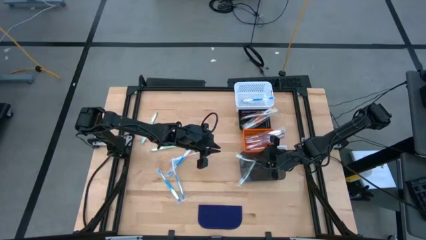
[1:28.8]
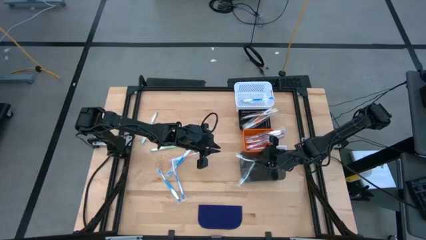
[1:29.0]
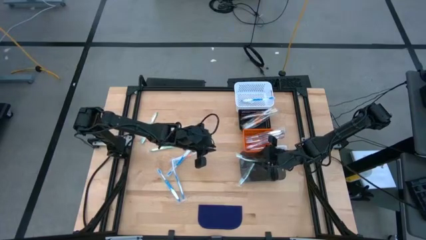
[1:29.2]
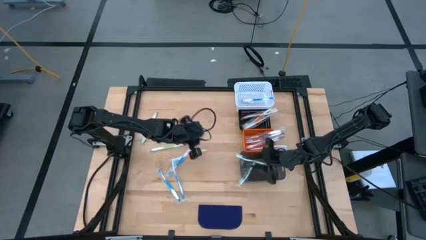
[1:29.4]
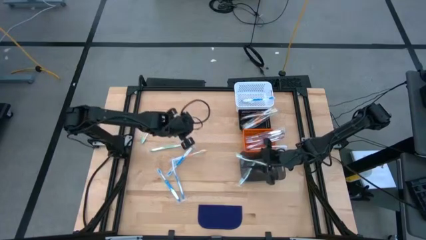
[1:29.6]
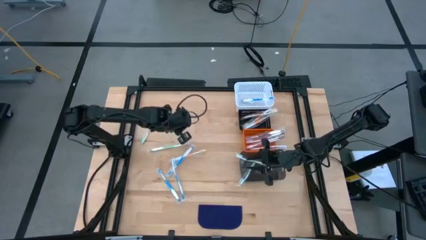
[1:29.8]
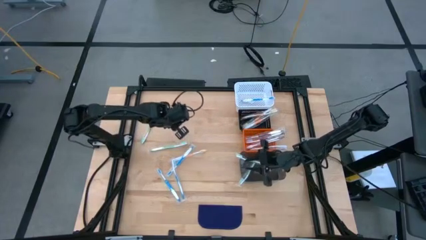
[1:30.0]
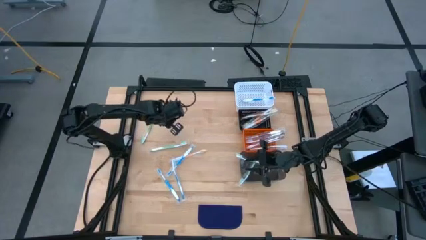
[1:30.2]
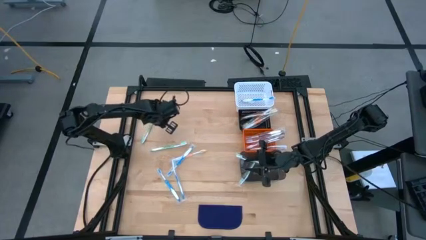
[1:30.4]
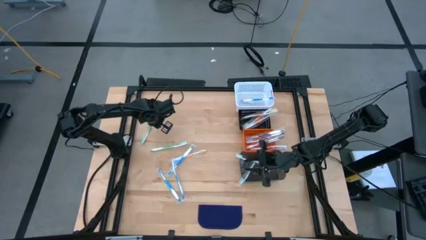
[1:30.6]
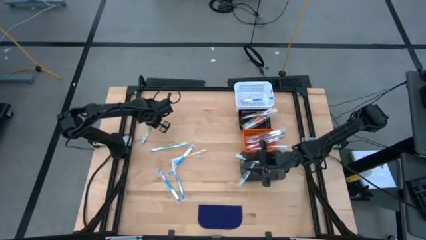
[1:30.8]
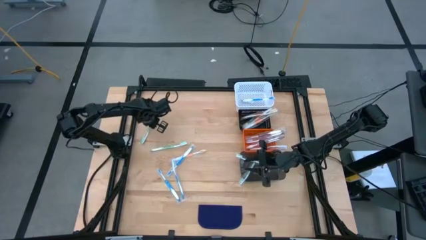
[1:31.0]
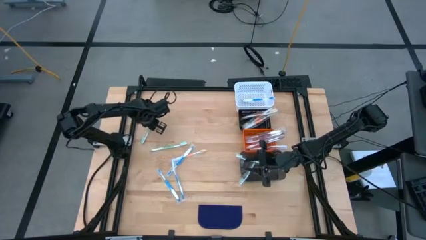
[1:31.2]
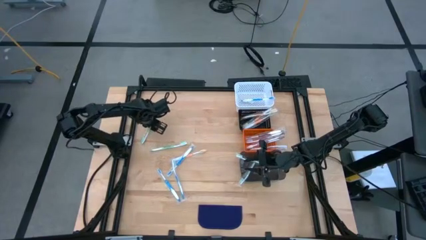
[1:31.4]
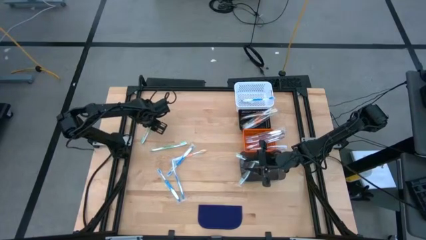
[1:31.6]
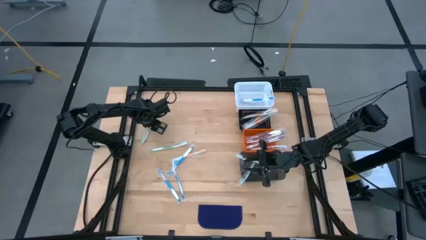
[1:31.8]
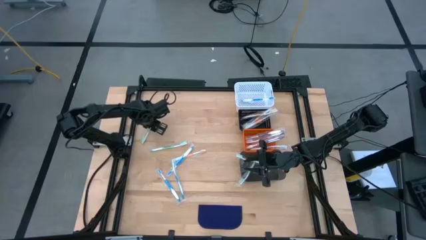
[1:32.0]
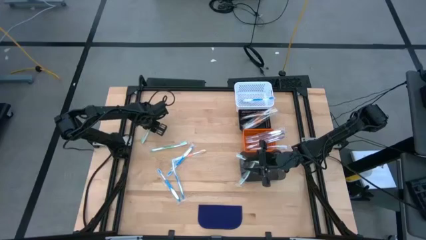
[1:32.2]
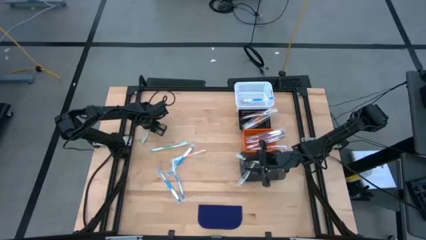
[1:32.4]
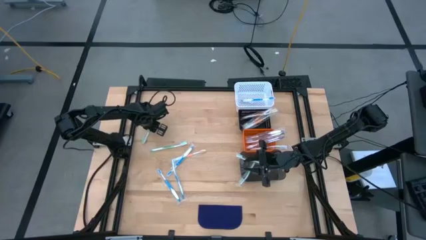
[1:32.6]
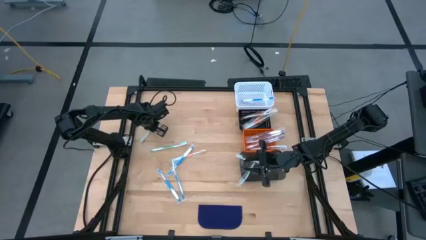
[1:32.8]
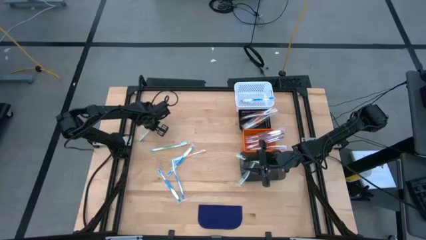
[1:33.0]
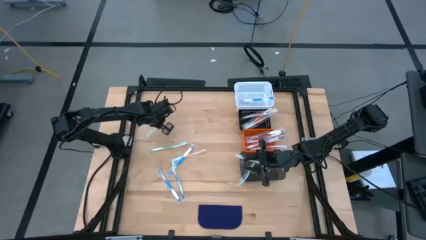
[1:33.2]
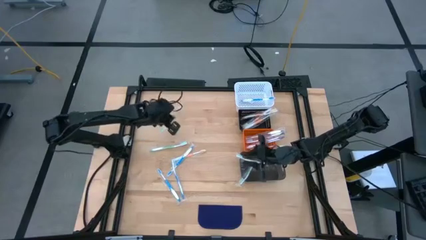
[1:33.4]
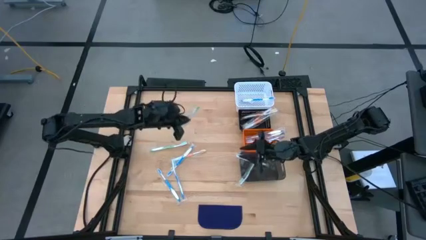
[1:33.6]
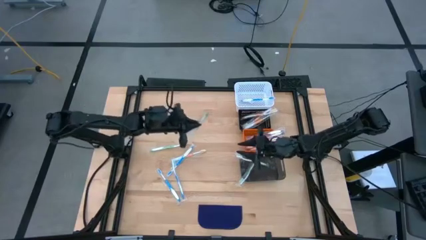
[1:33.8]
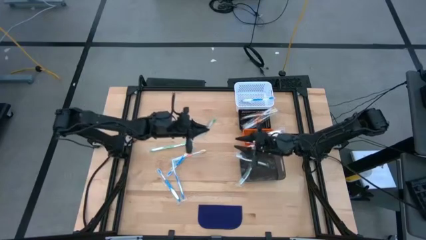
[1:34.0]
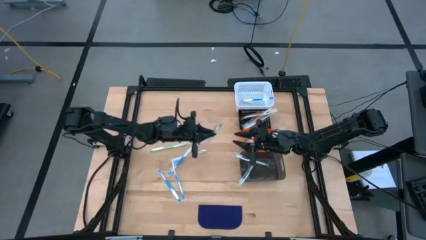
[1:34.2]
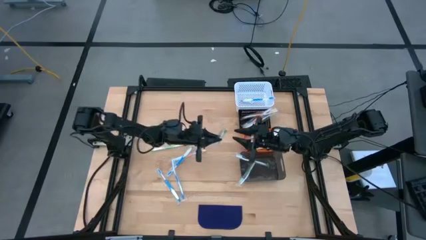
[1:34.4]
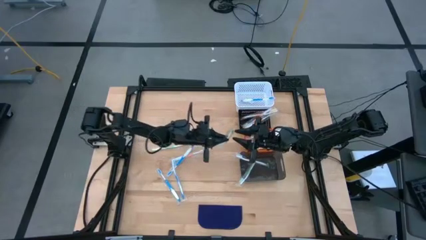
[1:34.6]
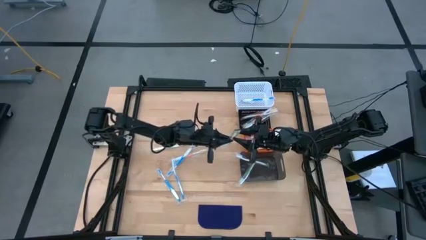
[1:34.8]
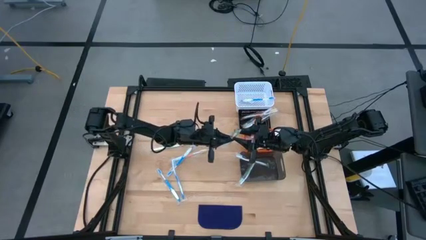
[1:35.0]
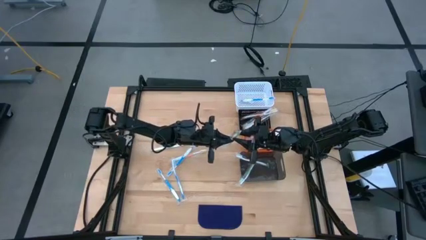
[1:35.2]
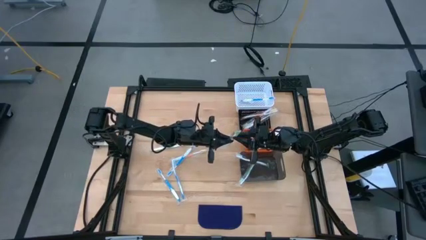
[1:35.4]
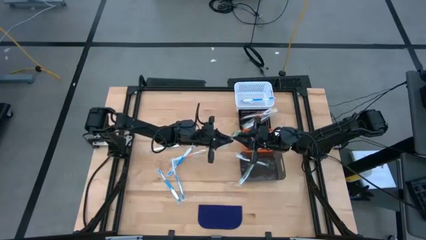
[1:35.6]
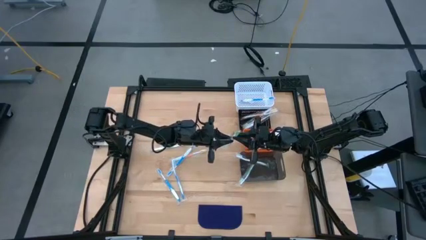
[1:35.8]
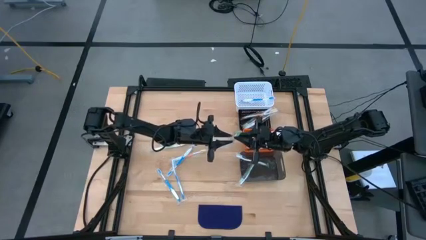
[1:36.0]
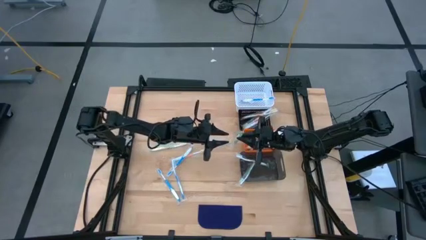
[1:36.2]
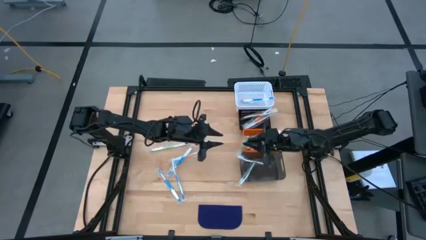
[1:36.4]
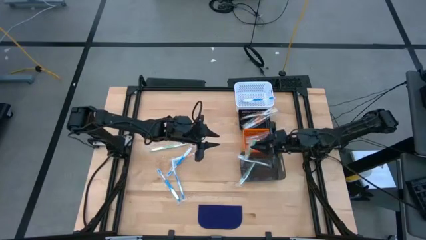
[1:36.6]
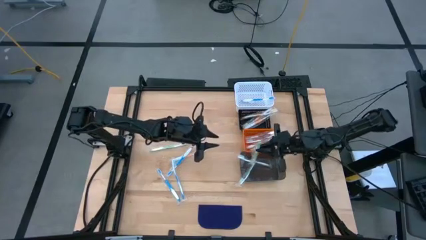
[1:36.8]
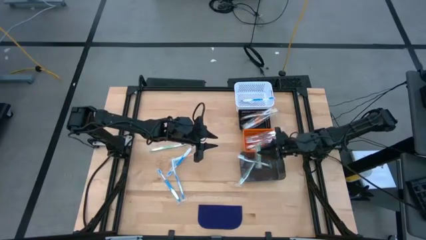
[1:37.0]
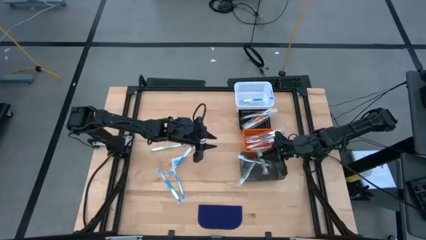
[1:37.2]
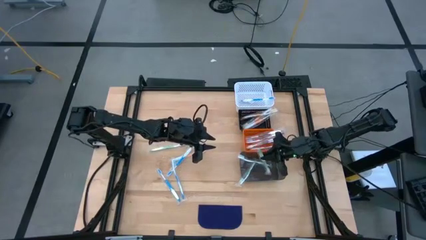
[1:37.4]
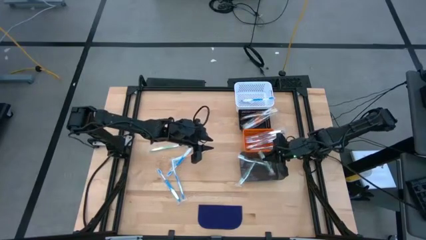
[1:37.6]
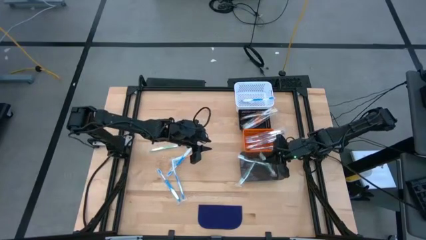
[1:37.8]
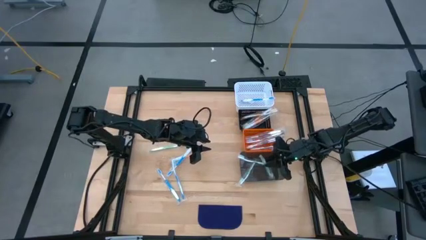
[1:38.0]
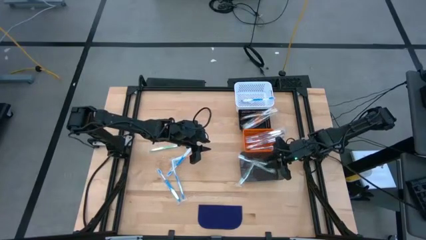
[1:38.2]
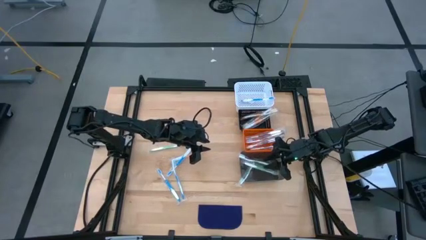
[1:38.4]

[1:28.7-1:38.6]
Task: Pick & Place Toothbrushes
Put the green toothbrush into the transparent black bin

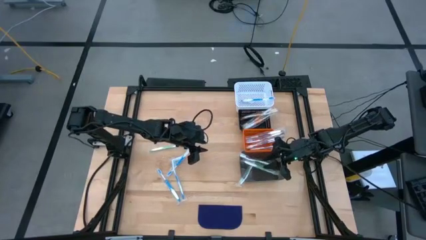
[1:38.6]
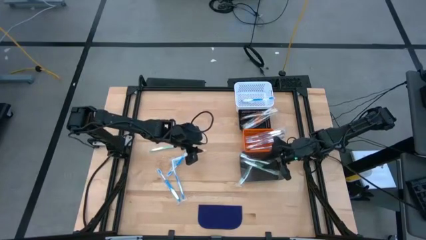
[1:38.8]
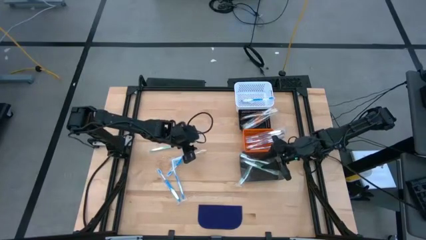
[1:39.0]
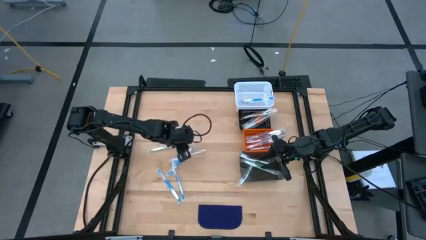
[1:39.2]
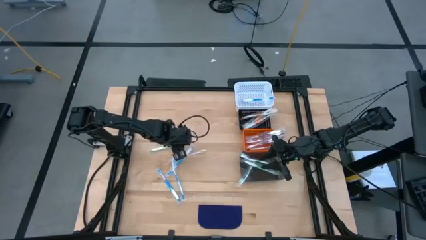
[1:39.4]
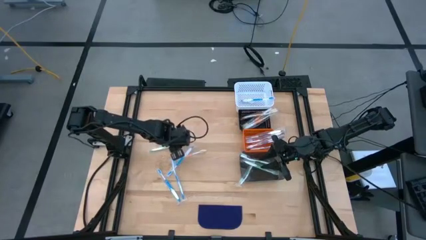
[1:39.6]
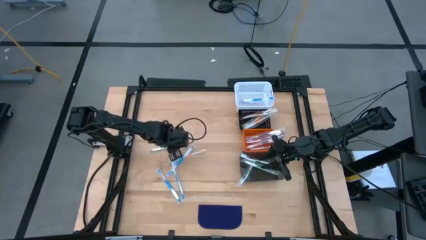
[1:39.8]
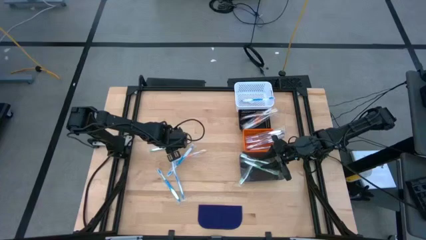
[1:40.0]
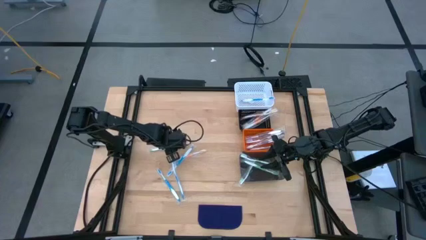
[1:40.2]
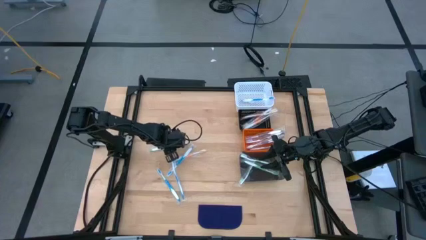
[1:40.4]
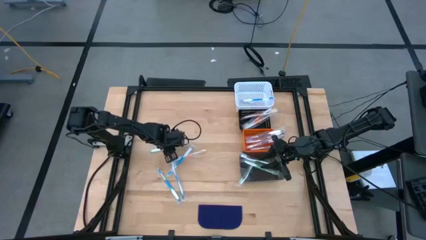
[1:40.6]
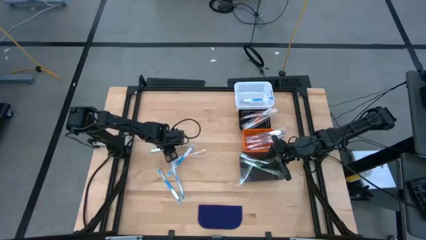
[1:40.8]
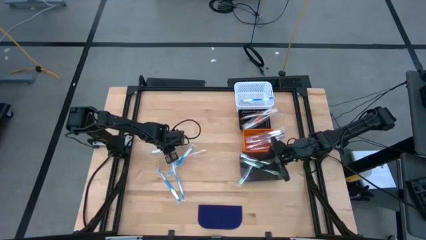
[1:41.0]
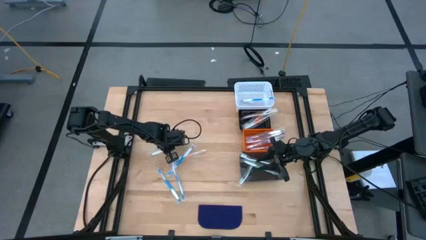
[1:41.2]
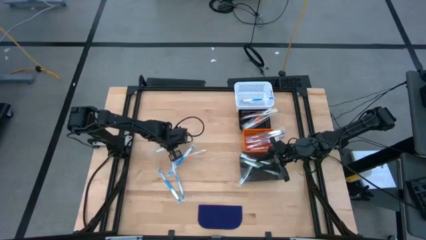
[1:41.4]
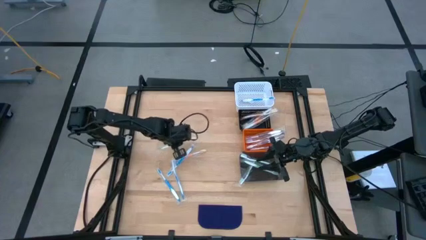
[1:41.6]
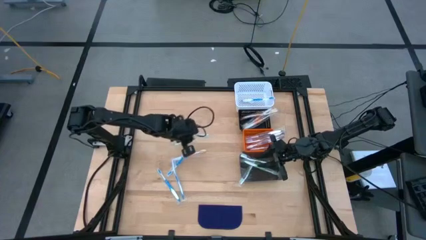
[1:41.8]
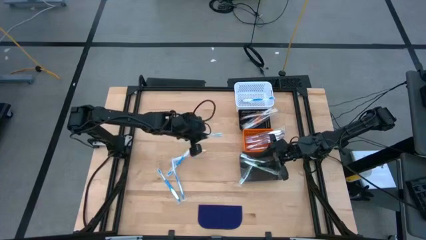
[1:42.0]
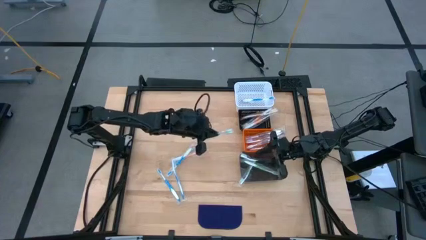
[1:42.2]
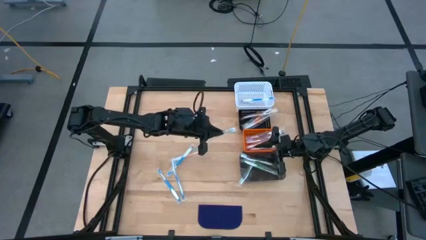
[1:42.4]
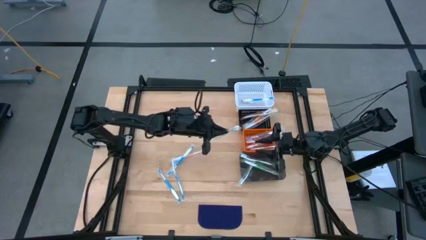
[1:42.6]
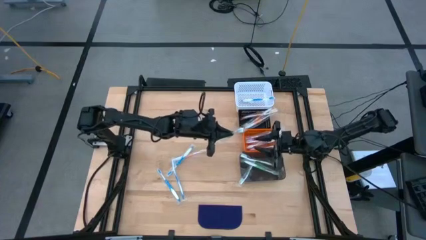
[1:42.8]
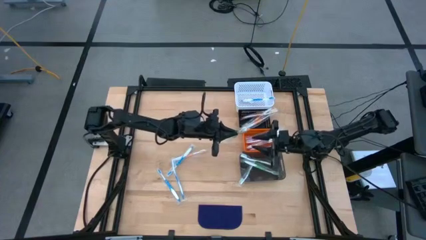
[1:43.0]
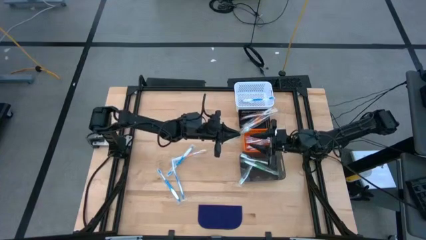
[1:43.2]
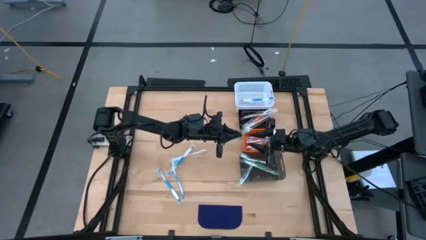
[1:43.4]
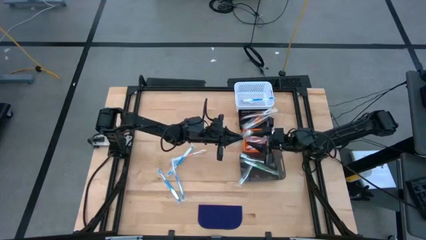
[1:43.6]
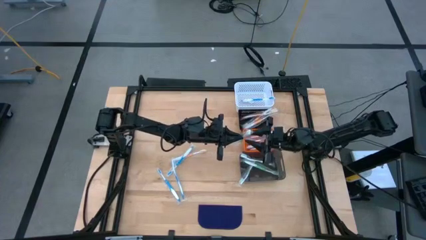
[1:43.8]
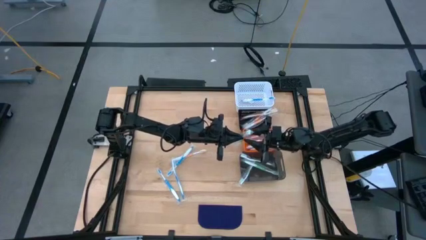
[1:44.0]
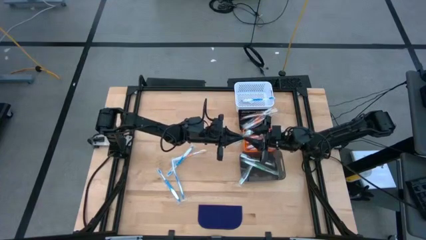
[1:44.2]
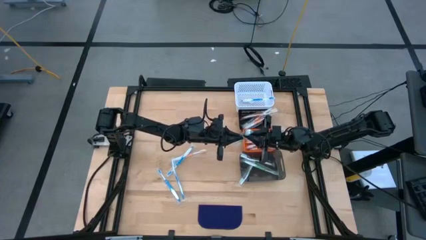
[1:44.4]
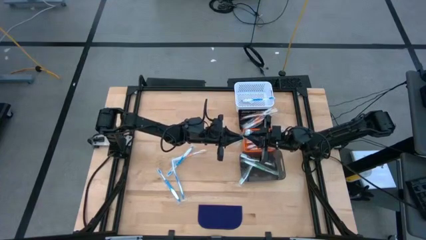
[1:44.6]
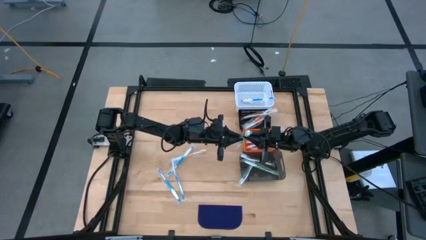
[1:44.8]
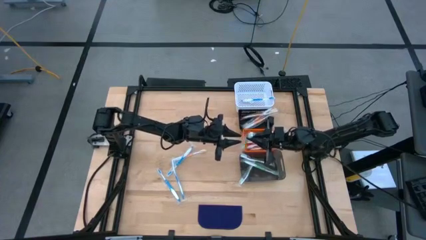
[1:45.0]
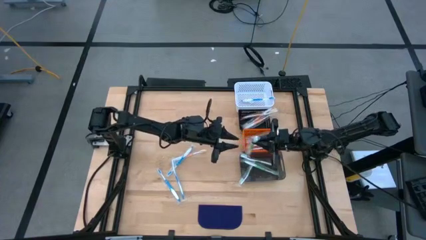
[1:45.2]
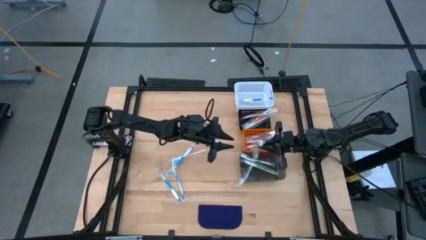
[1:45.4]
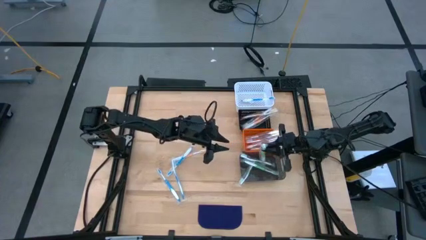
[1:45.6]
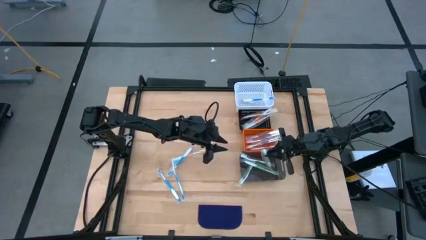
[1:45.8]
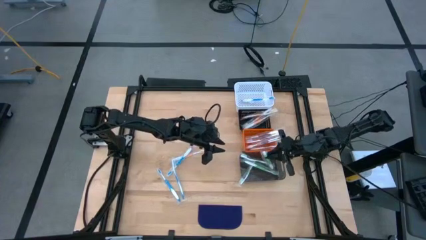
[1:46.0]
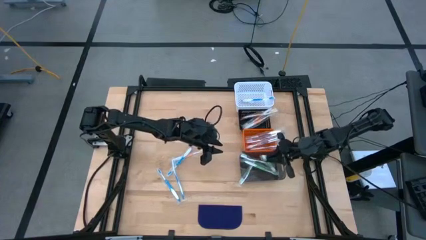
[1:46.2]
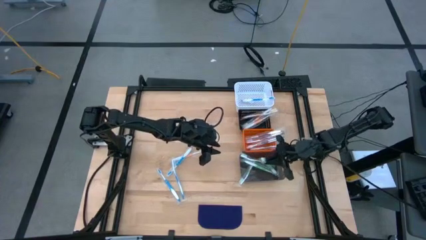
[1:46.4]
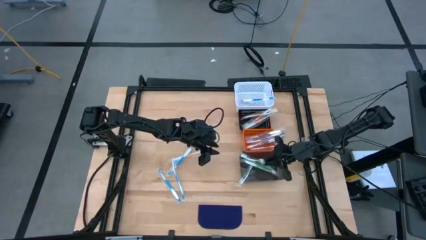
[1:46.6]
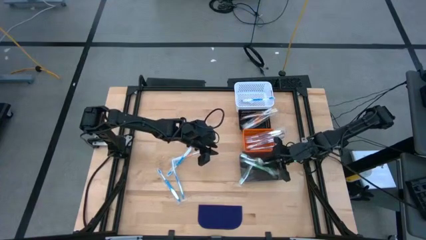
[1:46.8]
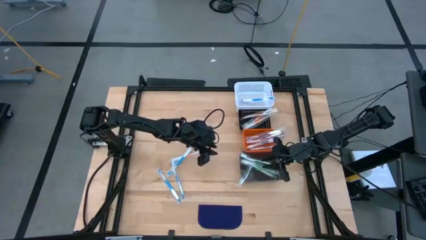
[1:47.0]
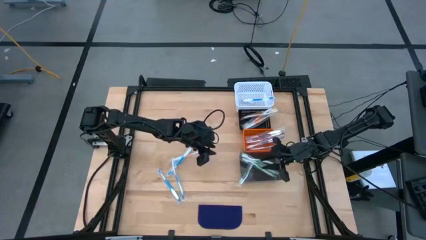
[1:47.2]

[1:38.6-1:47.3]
Put the green toothbrush into the transparent black bin
